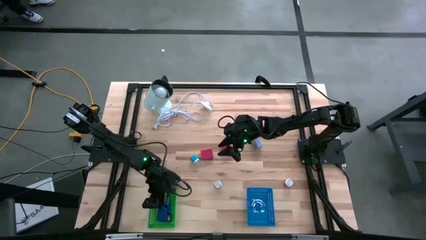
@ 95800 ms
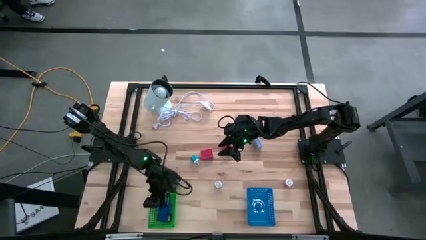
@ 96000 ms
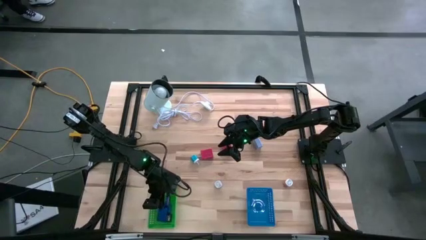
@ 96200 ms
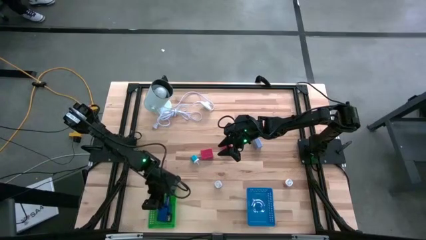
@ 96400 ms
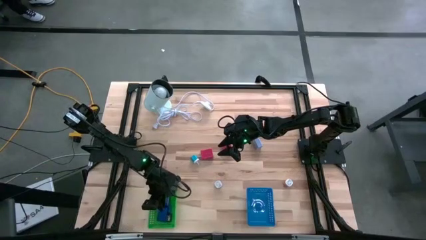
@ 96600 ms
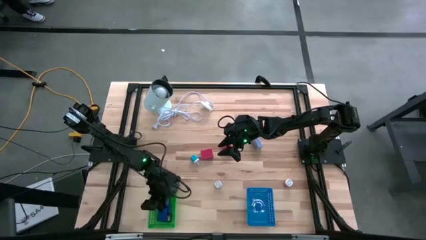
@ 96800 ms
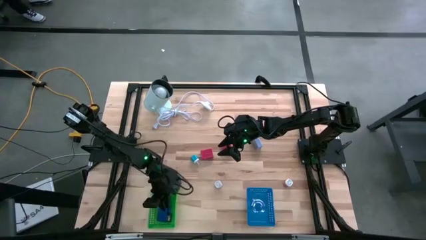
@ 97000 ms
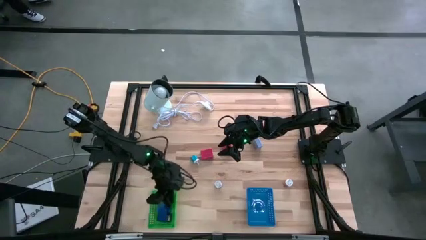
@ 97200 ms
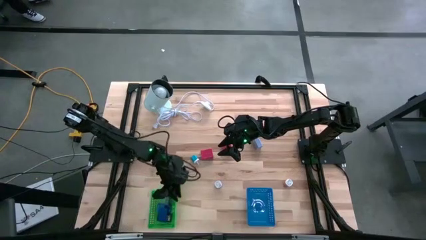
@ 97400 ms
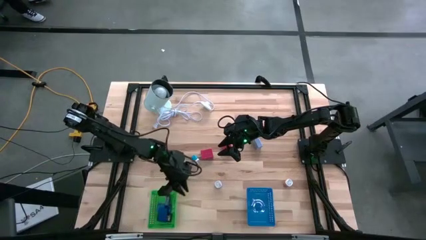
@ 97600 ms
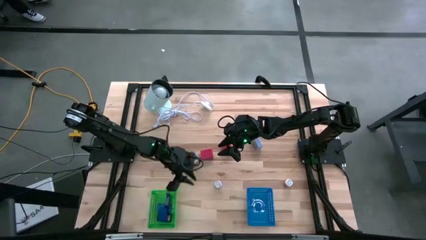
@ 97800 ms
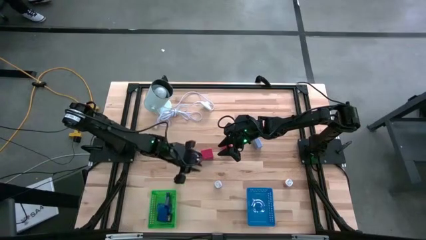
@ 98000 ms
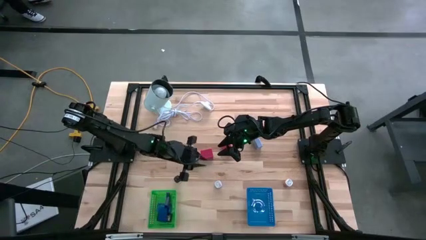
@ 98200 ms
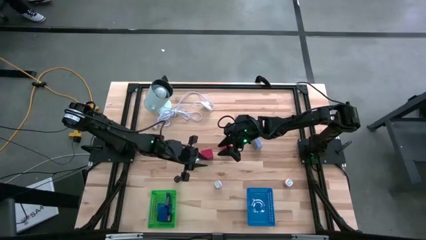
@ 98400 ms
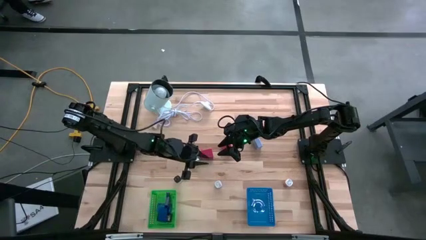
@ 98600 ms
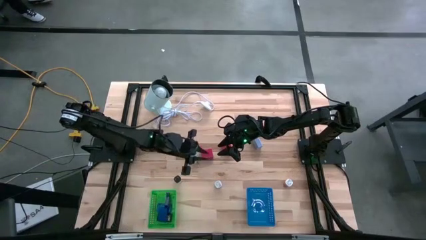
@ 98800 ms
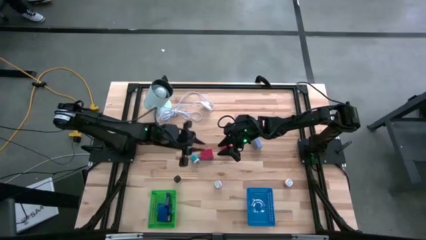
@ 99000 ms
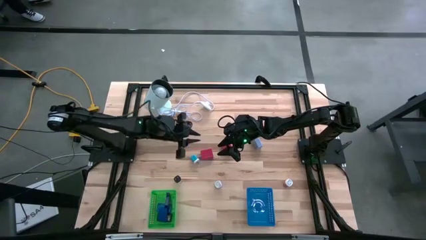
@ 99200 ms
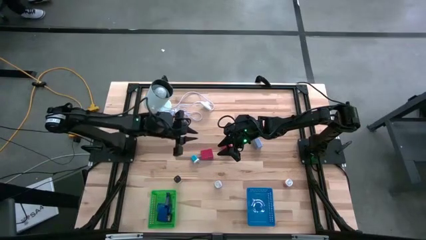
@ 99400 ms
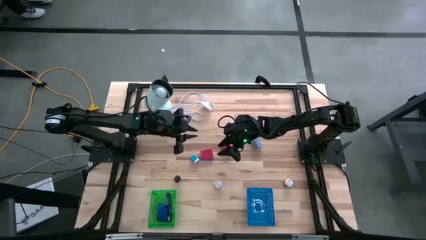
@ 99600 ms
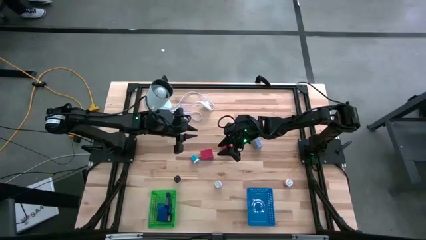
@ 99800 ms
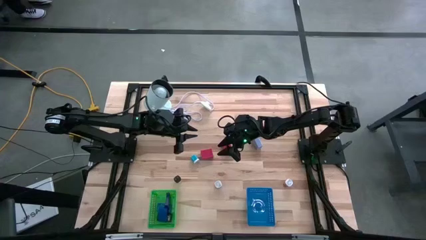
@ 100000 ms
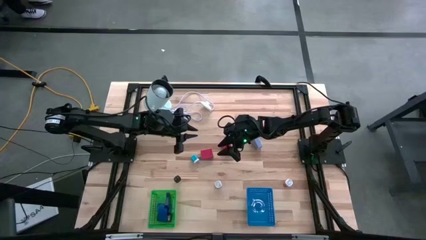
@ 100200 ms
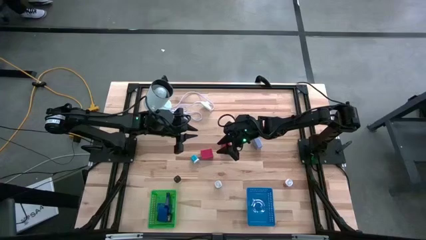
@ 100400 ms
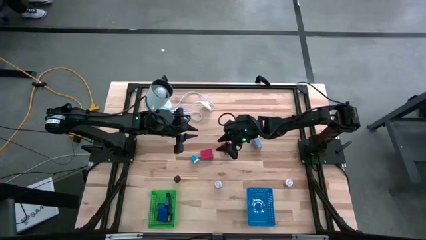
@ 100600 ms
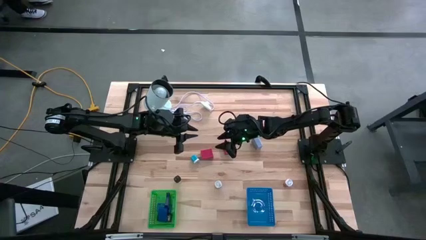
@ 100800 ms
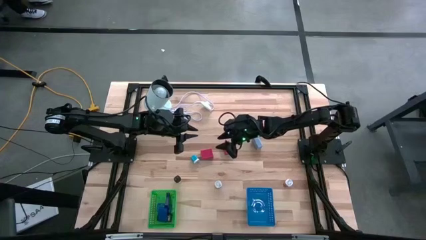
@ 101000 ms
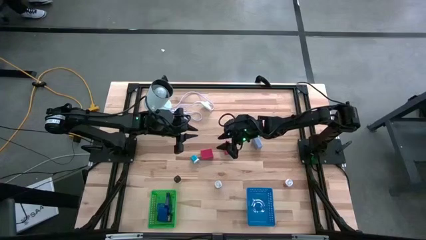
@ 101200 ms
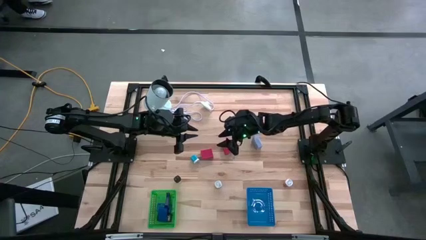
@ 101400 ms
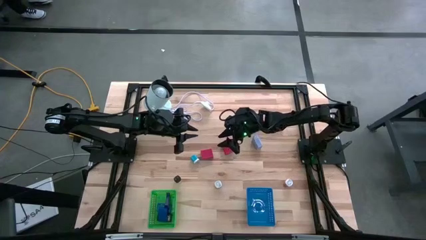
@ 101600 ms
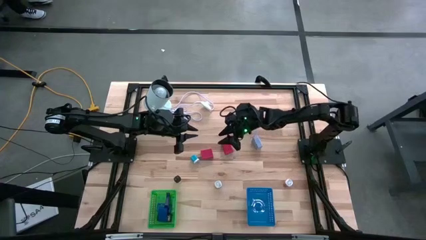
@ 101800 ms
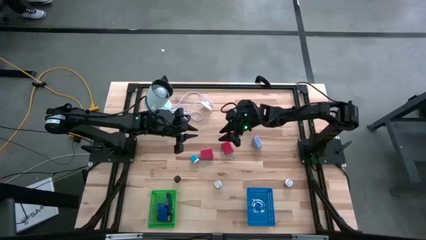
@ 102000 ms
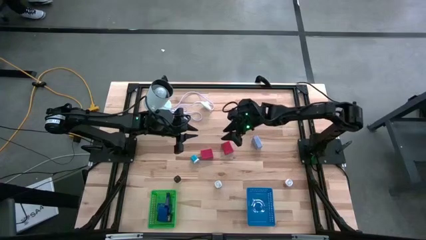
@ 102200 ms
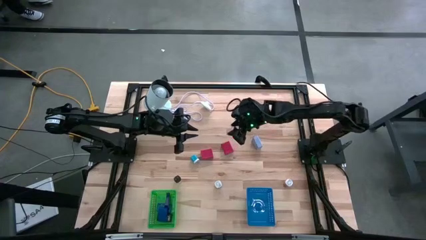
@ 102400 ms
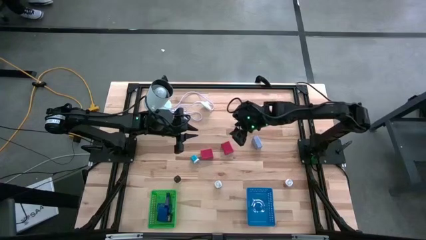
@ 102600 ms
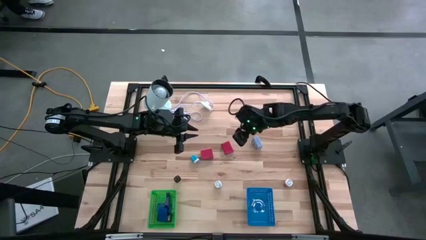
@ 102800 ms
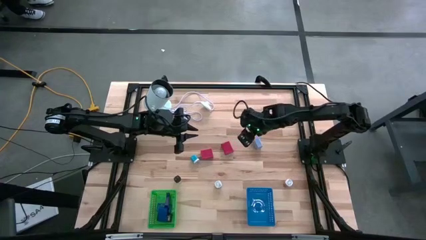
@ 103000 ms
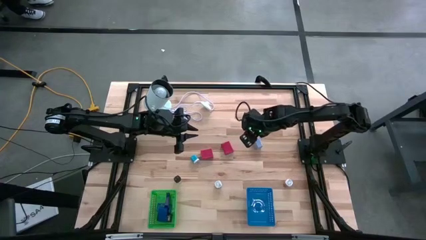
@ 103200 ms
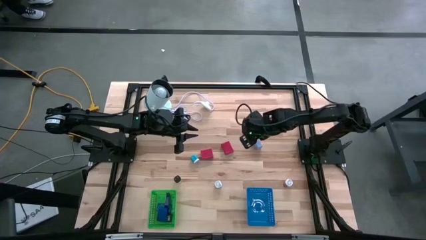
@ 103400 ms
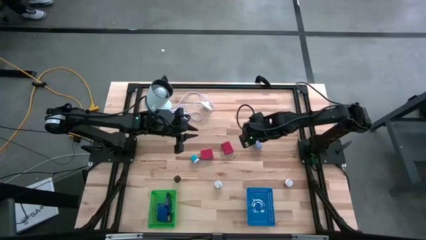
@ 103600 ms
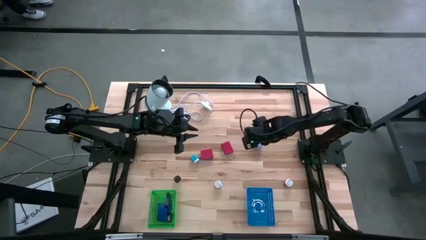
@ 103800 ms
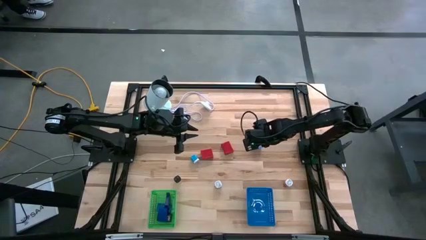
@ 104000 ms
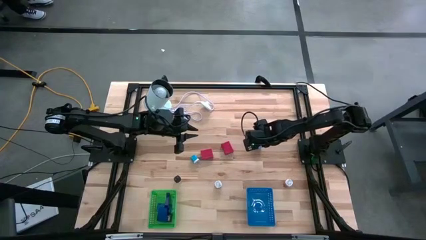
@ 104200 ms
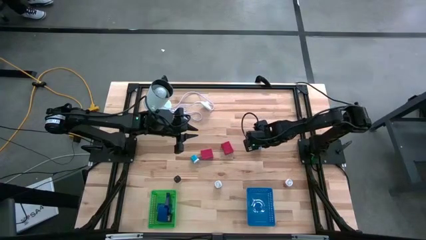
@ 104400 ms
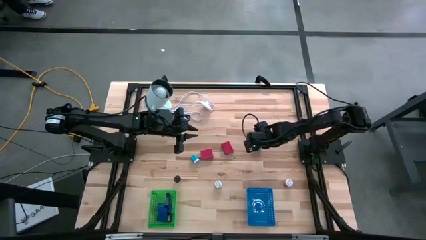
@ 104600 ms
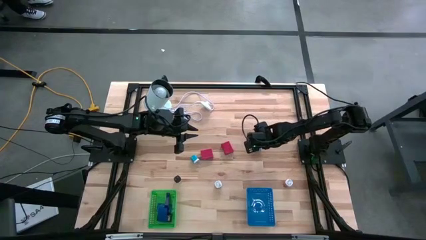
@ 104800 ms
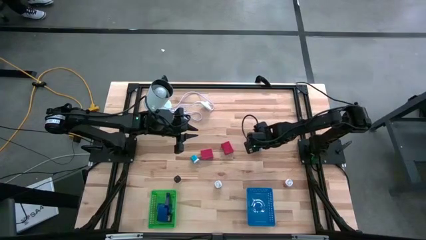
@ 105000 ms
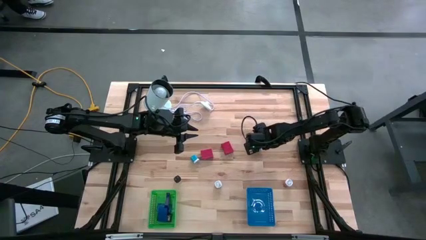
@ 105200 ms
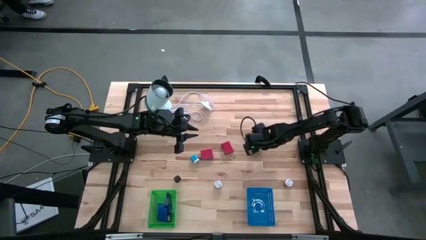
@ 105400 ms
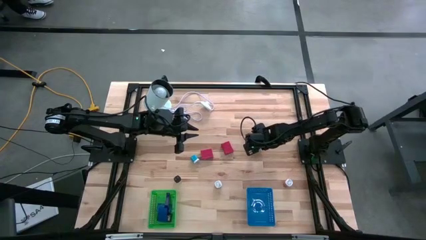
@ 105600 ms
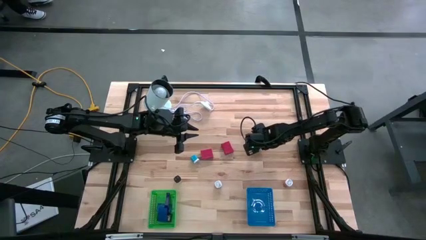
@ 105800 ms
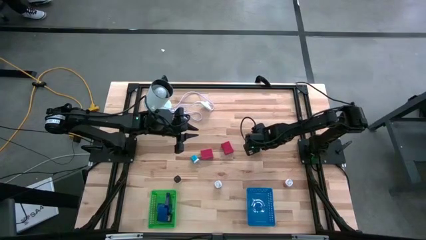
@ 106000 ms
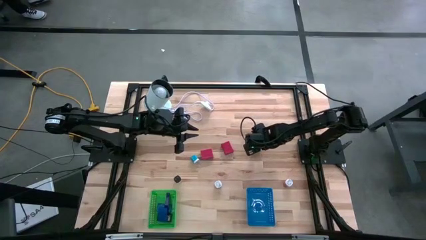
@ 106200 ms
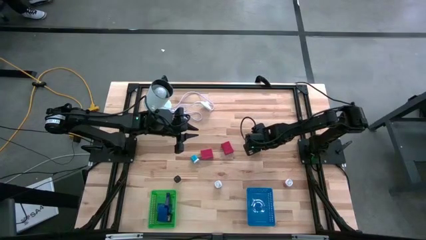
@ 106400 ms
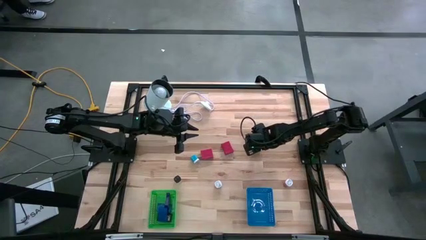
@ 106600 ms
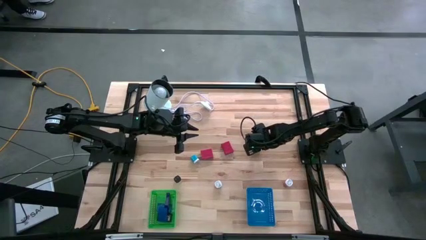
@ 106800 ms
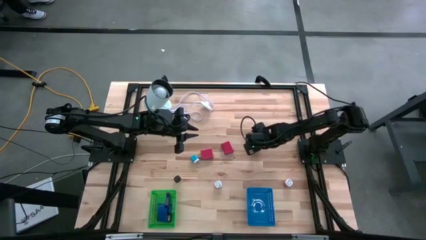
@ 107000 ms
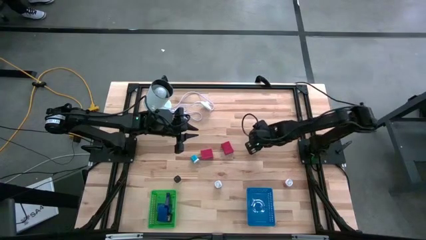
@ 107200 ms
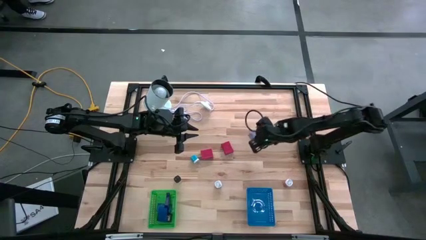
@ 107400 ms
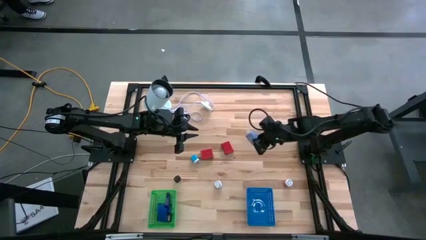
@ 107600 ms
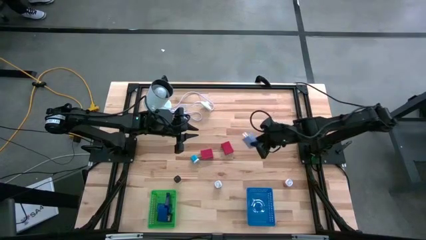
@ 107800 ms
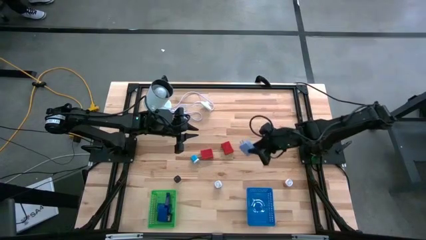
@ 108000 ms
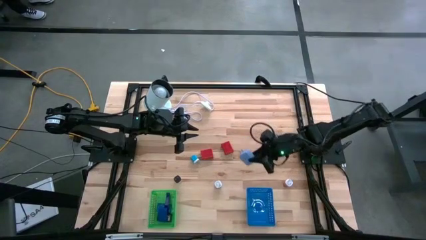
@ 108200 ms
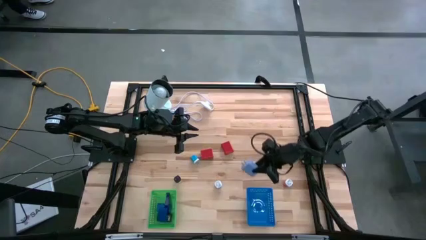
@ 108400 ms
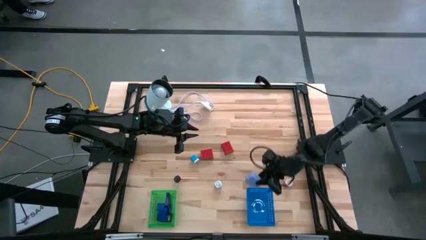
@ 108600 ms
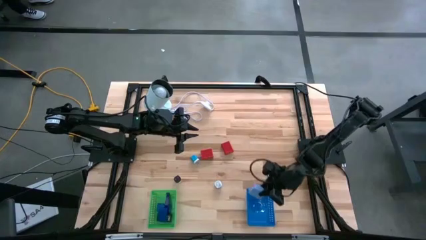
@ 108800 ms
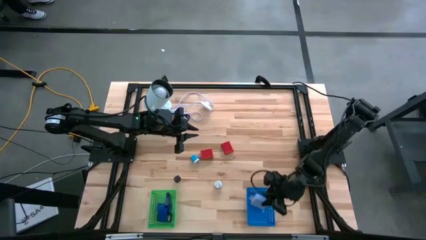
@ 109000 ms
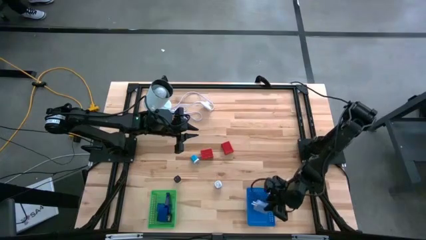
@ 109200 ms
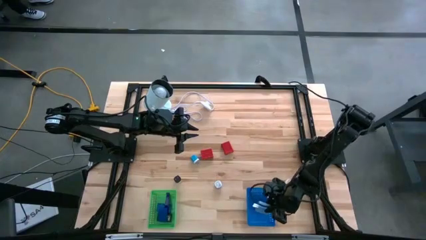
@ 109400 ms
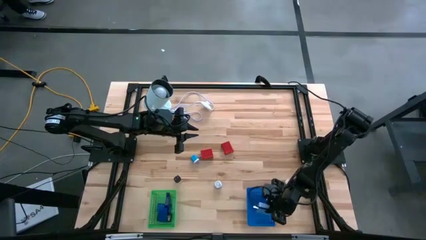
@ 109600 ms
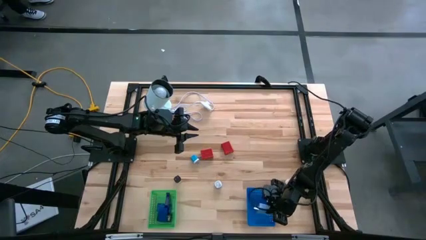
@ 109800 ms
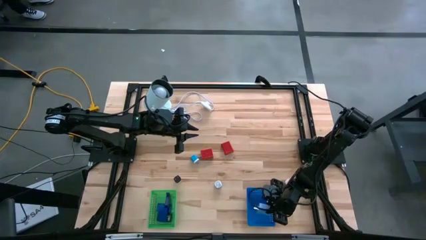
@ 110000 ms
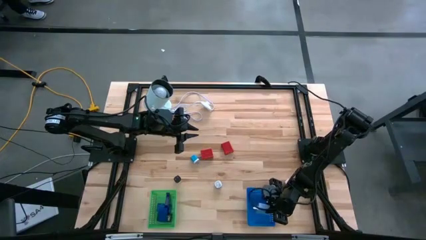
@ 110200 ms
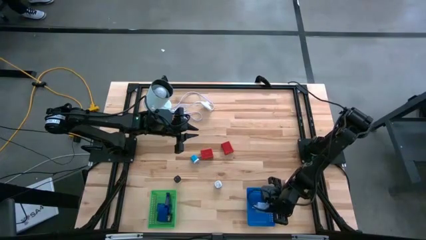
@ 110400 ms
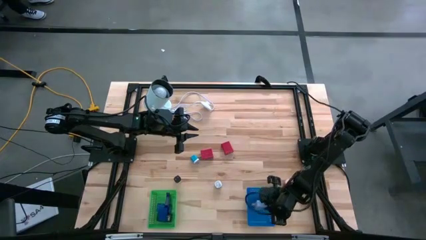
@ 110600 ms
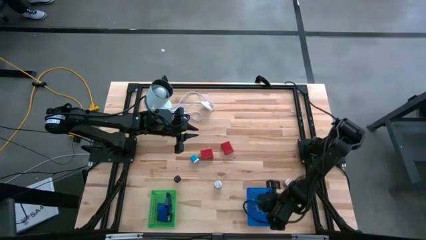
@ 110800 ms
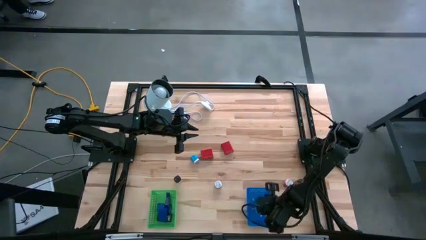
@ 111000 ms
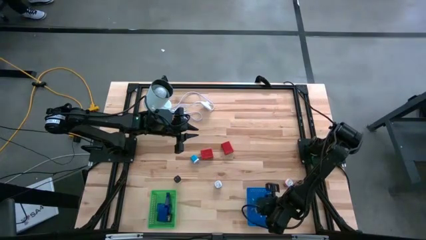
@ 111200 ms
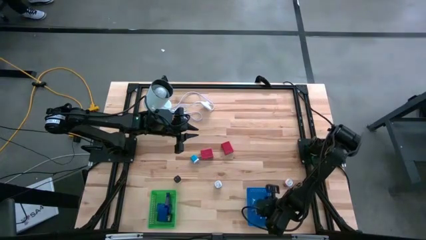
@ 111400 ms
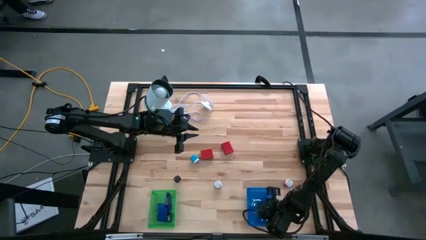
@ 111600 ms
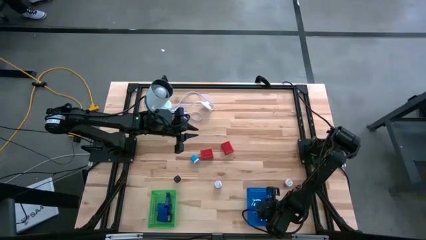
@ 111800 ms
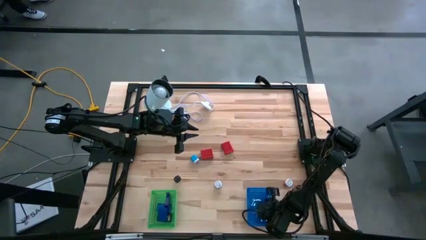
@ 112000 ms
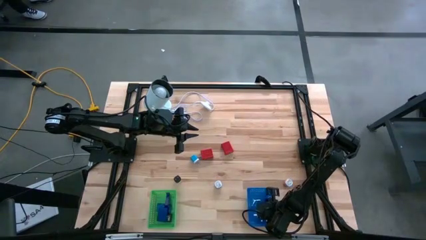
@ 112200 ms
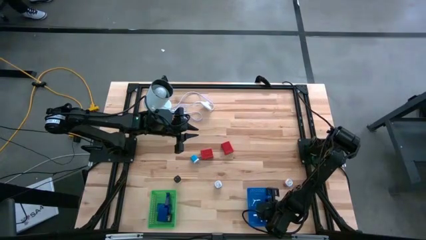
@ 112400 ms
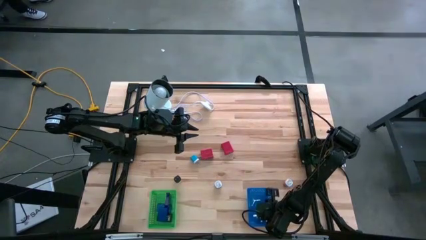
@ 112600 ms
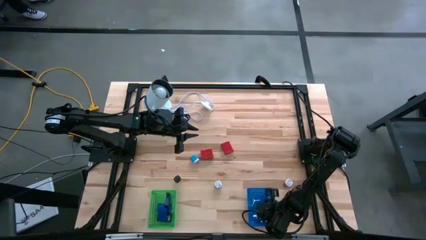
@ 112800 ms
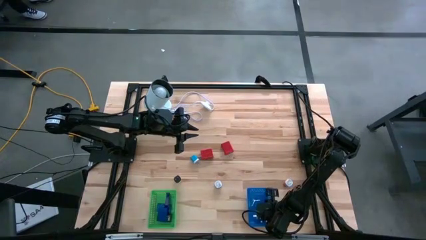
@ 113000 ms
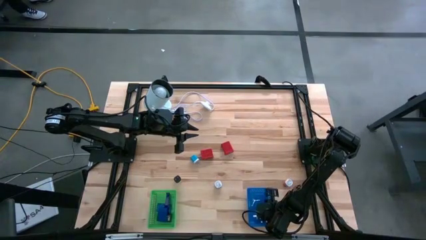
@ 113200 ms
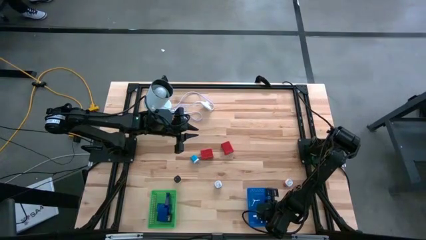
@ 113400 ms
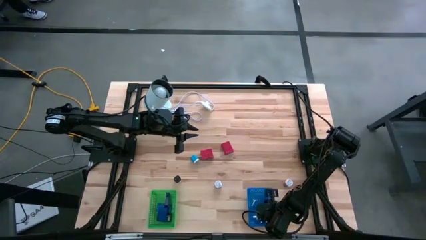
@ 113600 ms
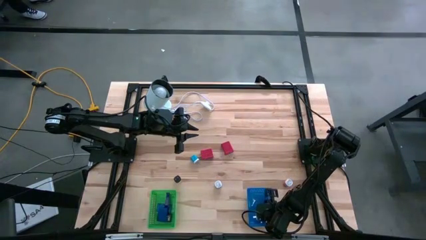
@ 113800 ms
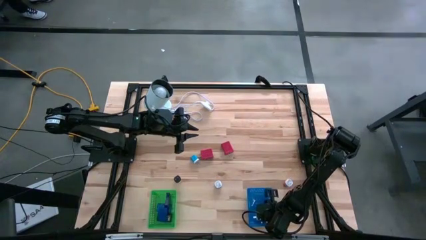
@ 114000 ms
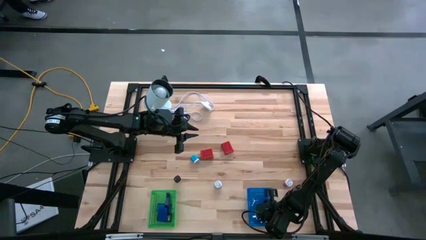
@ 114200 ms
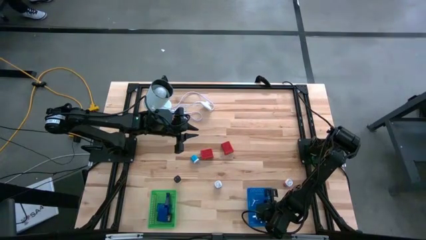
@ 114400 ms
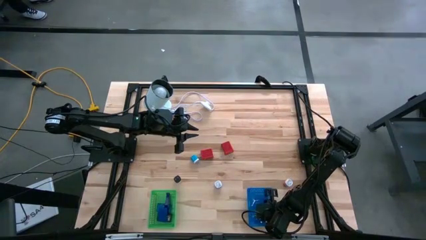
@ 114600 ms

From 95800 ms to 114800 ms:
Task: Pick & Place Office items
Put the white charger adapter into the blue bin
